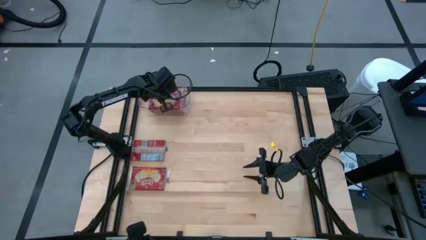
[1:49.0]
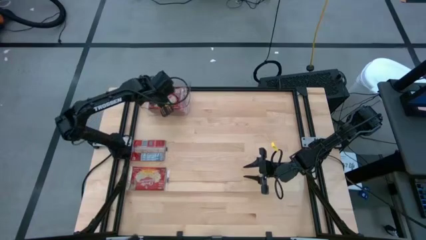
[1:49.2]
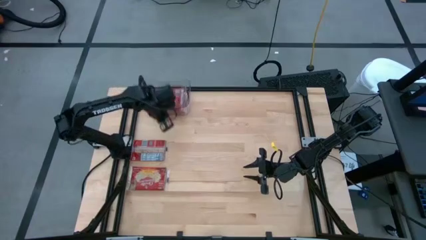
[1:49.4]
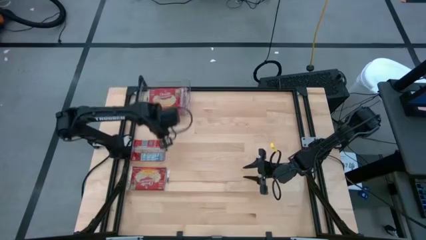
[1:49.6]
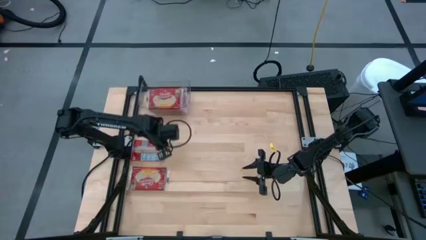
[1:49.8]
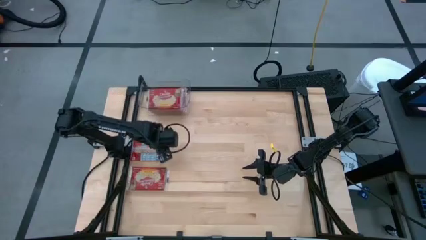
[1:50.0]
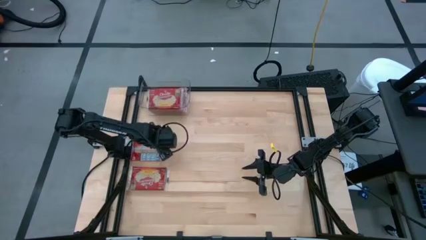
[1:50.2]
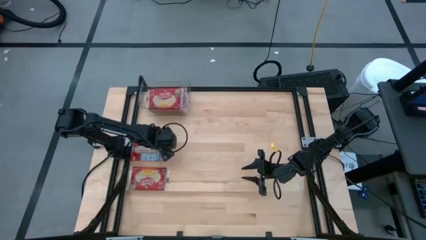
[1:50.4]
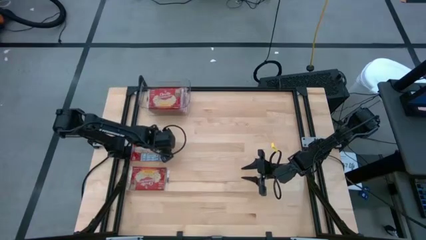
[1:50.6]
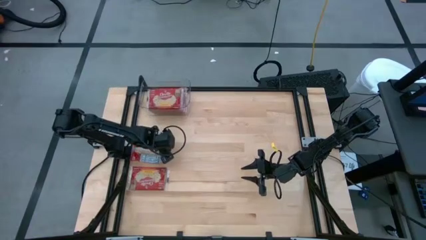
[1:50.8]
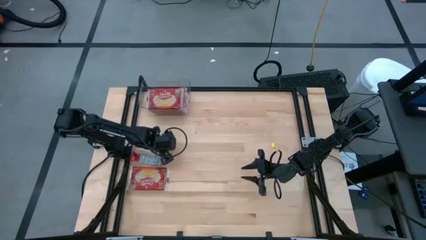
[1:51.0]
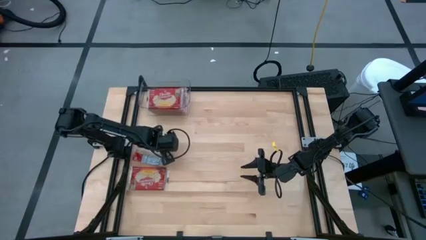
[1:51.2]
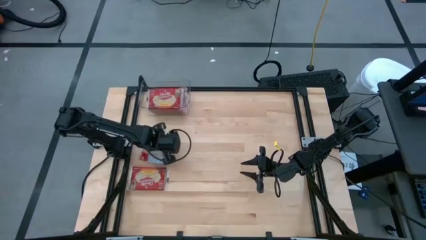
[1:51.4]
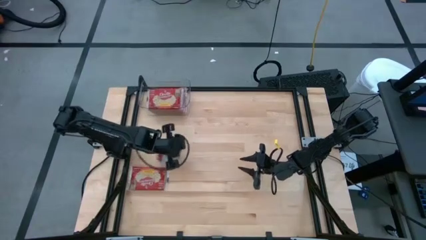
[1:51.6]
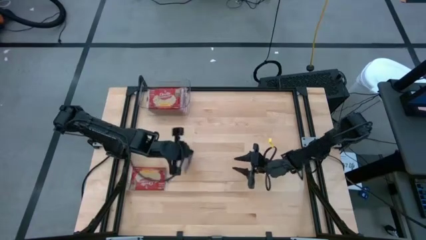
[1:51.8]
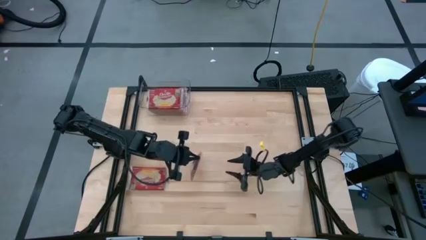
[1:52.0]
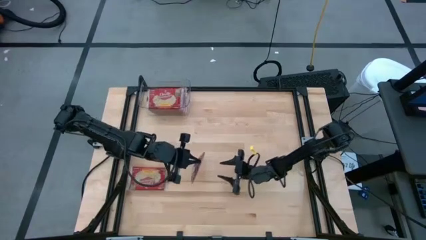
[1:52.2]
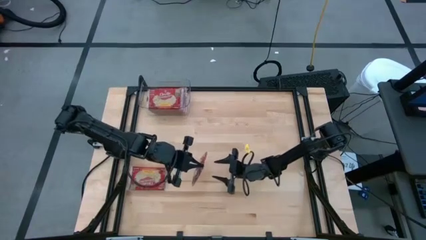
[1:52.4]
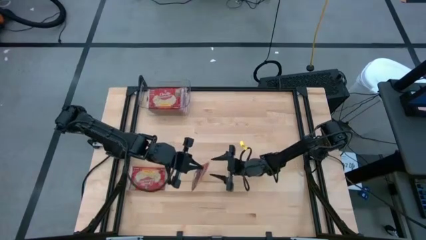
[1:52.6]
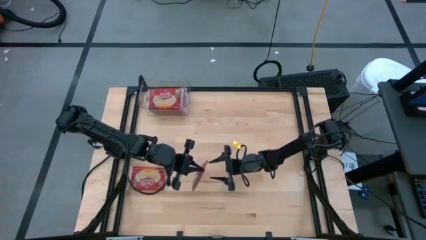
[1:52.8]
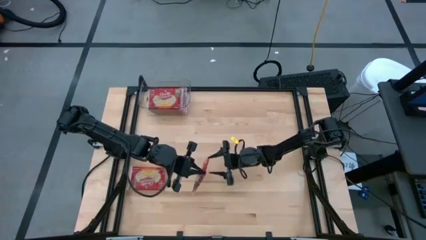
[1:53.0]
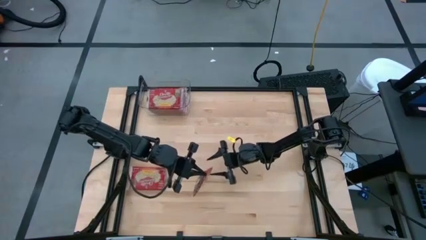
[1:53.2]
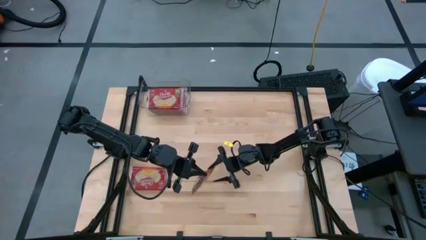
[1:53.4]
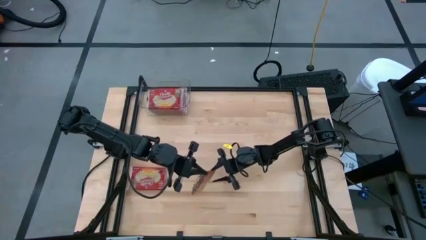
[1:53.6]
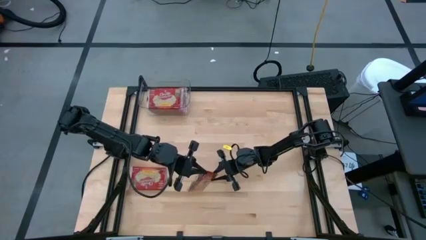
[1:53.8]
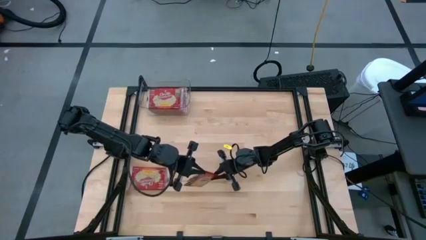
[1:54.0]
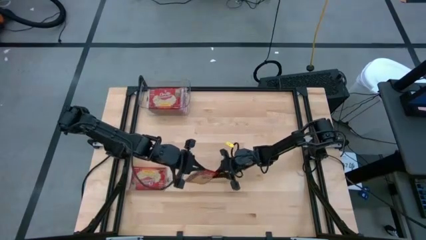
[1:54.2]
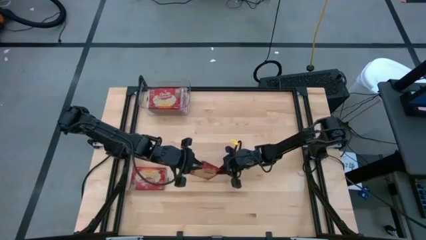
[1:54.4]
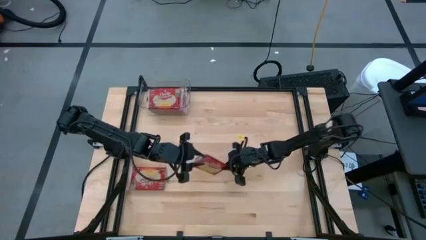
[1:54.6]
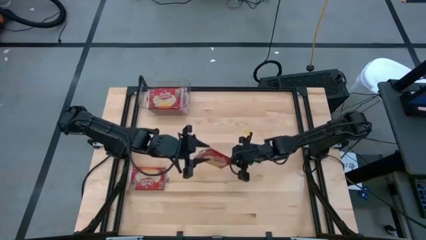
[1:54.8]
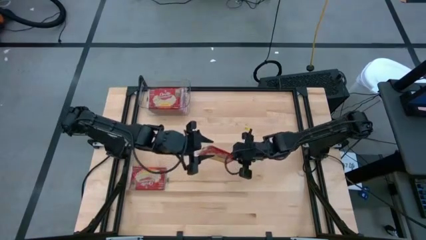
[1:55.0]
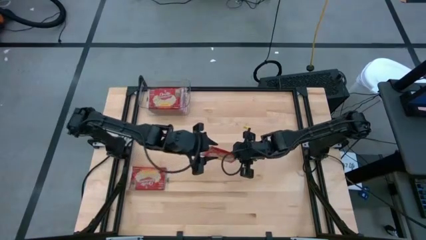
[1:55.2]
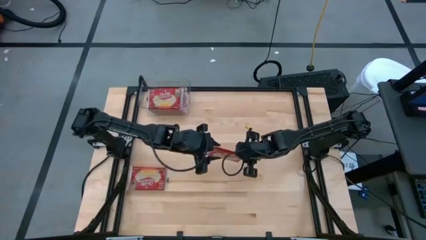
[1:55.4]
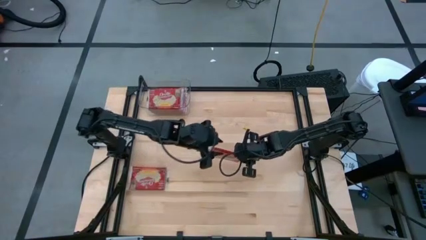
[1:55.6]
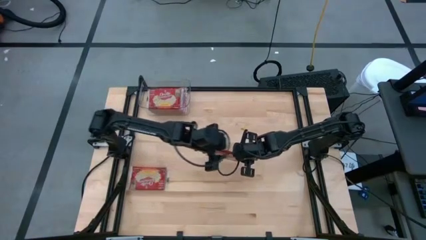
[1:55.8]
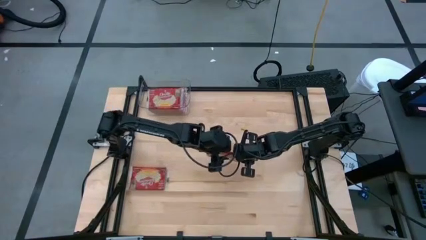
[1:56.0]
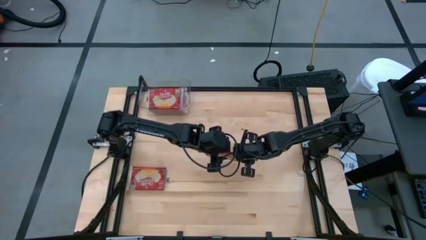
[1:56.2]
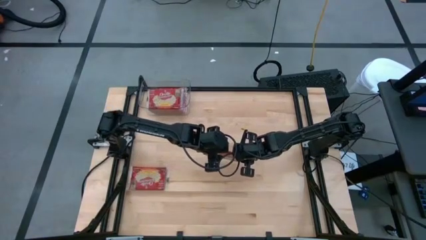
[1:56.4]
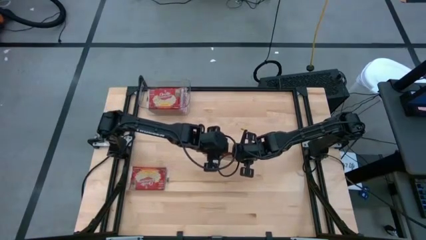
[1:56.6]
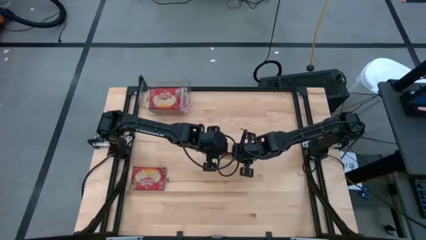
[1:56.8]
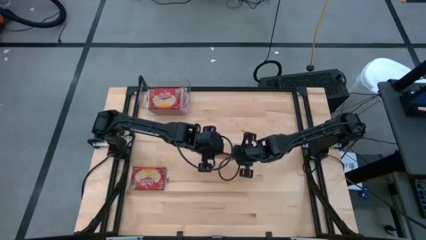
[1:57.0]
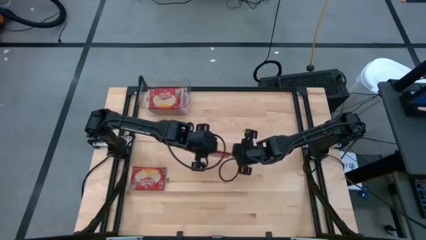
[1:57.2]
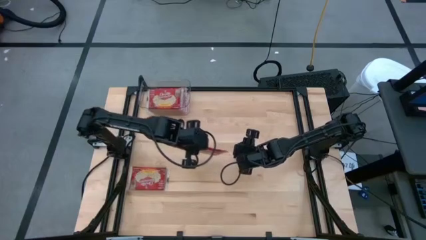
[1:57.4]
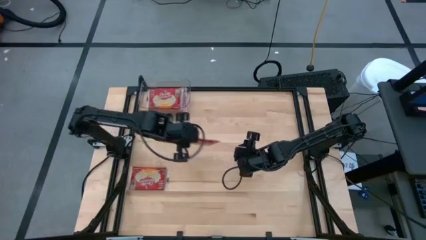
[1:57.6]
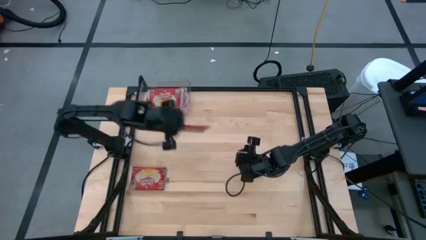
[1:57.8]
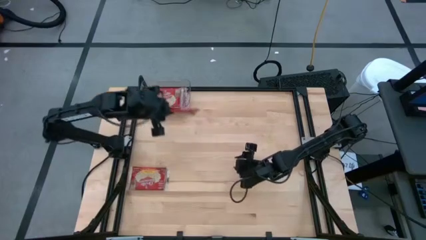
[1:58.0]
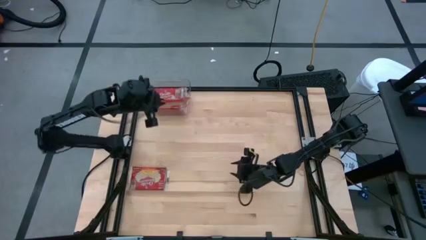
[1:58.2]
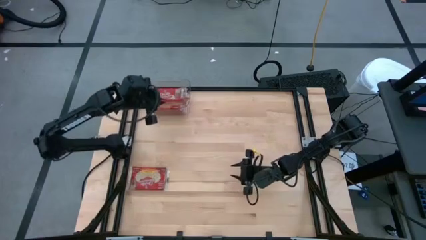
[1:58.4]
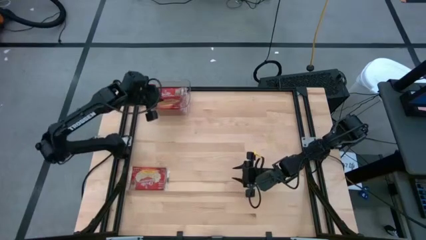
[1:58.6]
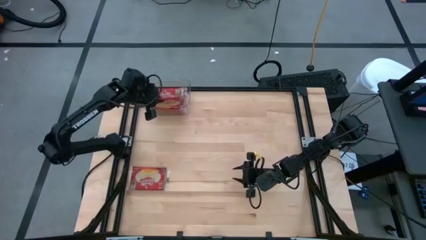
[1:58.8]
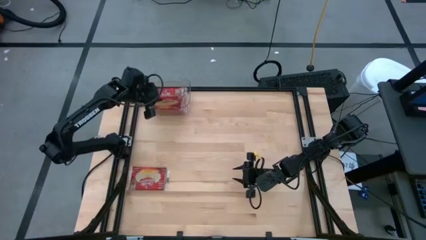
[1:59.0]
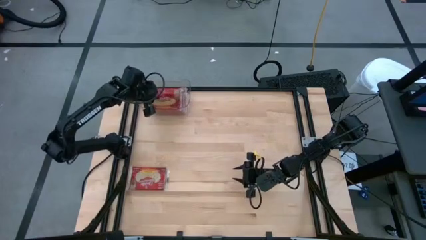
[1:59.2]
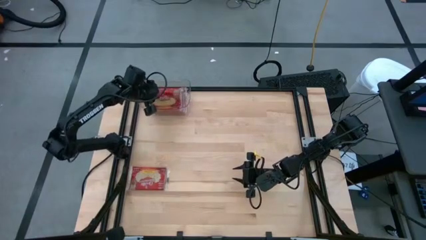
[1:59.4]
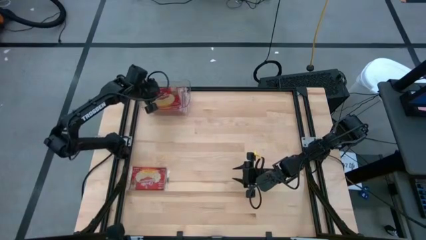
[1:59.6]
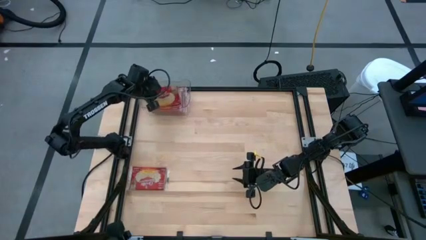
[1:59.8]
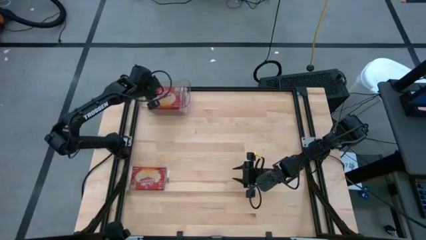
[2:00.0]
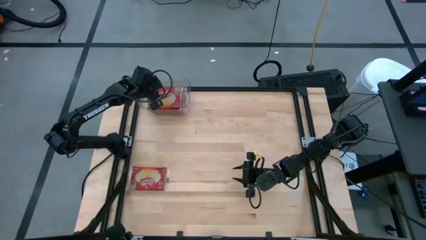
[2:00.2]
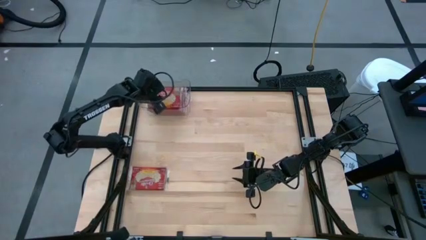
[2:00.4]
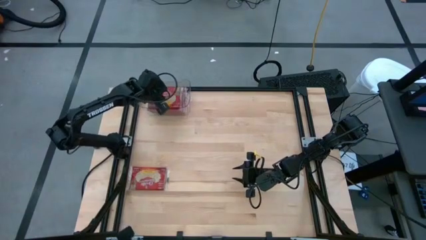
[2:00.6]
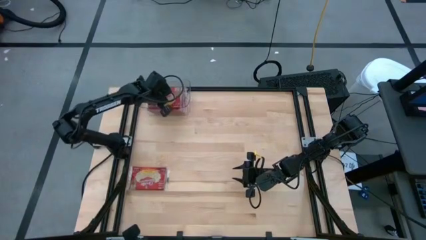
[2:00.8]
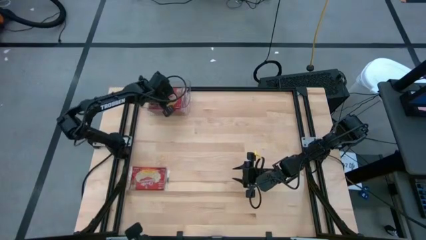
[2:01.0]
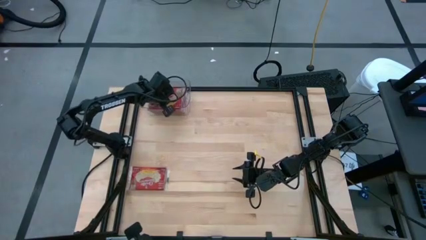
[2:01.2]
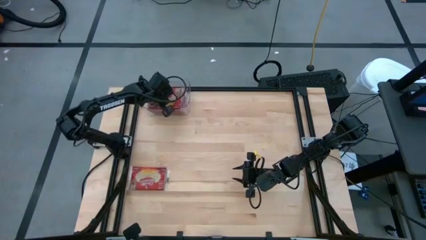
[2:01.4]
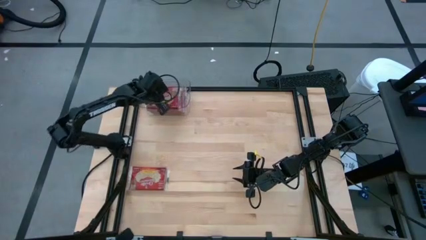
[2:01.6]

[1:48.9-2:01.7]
Task: Sort popcorn bags into baskets
Put the red popcorn bag into the transparent bin
